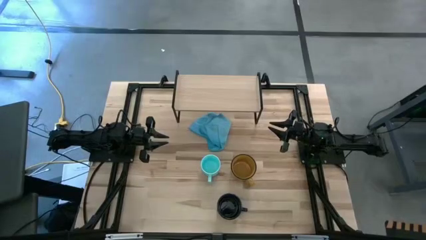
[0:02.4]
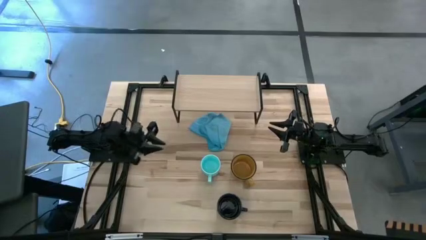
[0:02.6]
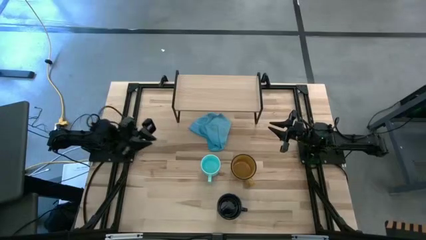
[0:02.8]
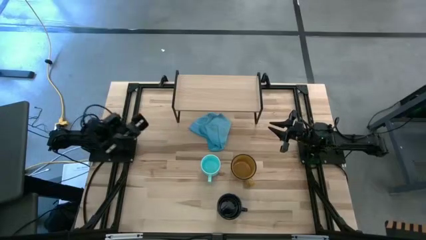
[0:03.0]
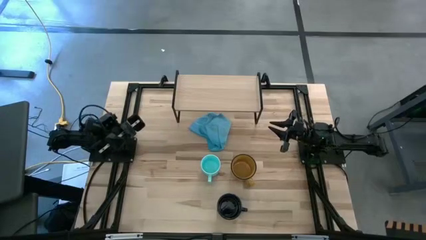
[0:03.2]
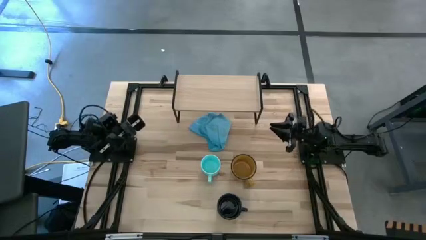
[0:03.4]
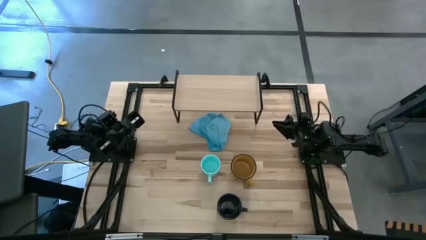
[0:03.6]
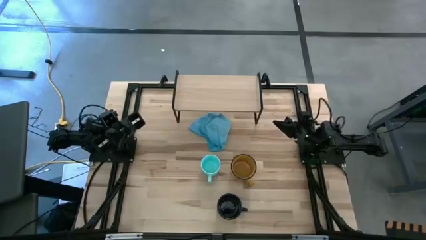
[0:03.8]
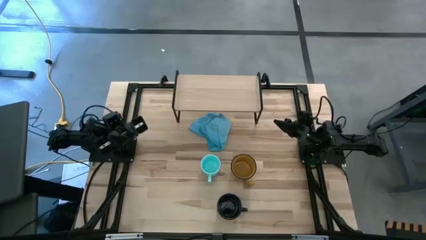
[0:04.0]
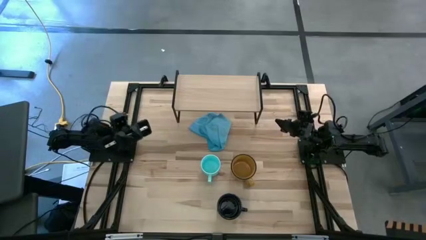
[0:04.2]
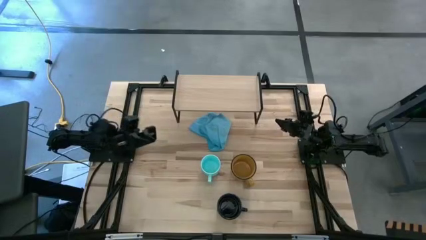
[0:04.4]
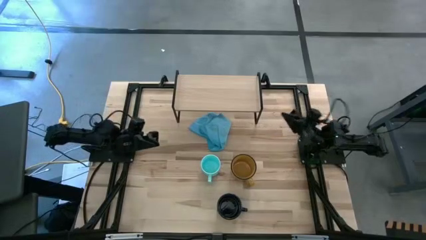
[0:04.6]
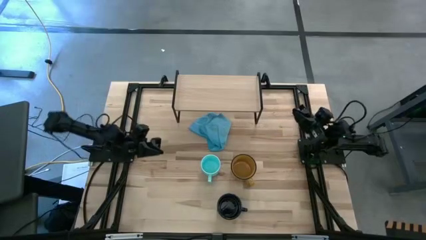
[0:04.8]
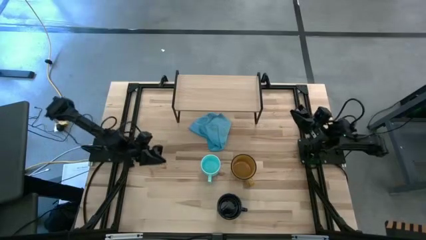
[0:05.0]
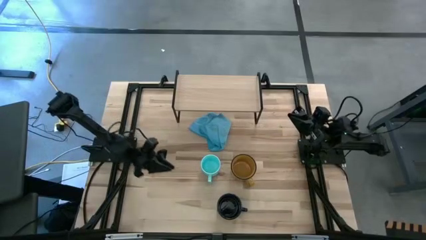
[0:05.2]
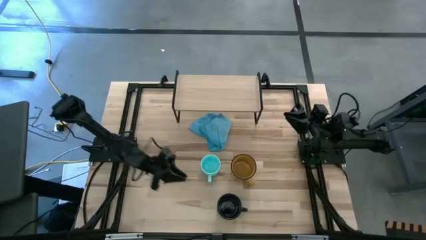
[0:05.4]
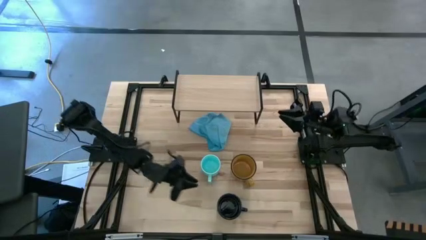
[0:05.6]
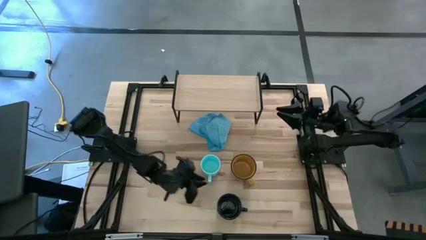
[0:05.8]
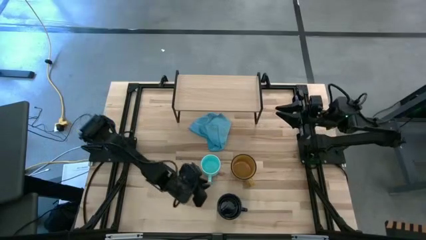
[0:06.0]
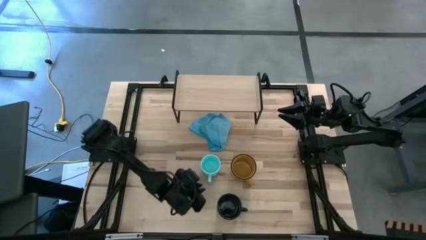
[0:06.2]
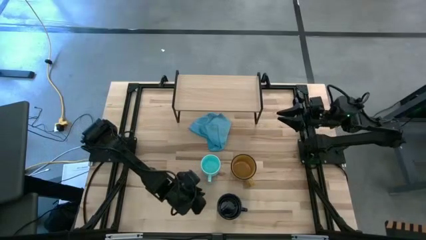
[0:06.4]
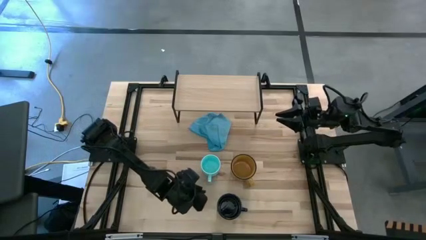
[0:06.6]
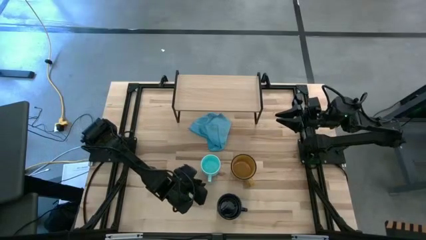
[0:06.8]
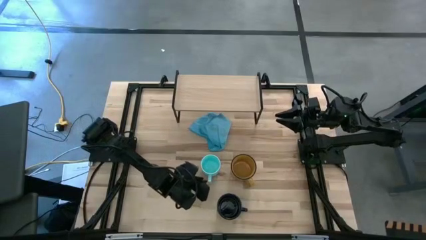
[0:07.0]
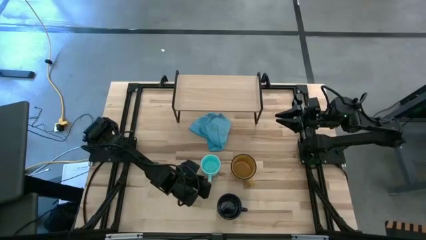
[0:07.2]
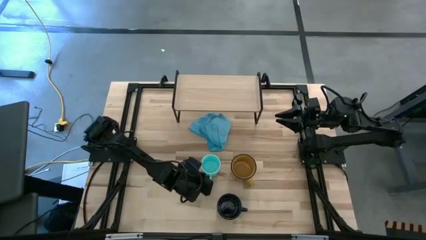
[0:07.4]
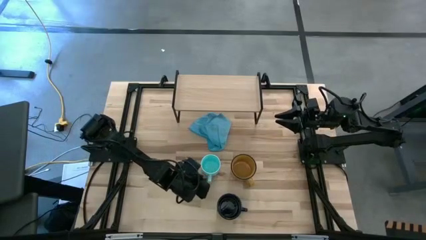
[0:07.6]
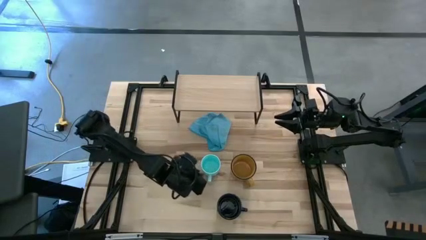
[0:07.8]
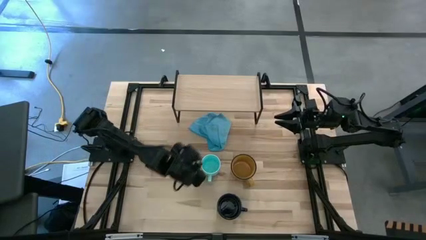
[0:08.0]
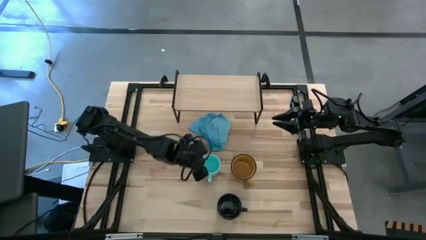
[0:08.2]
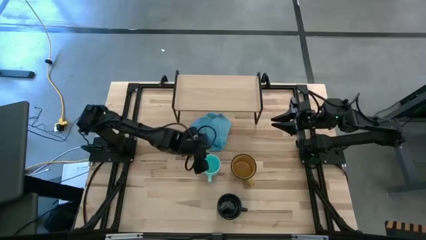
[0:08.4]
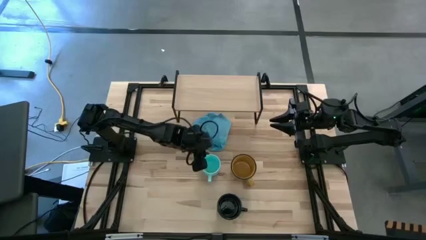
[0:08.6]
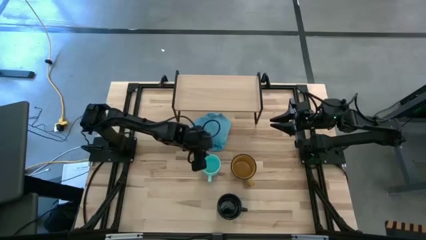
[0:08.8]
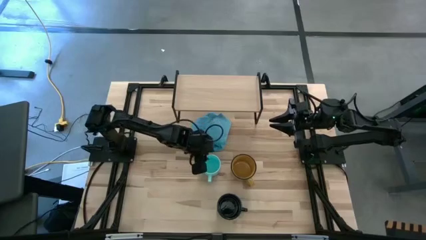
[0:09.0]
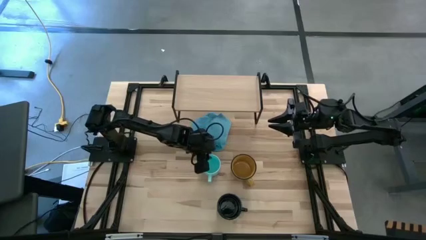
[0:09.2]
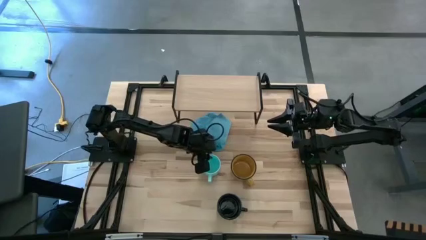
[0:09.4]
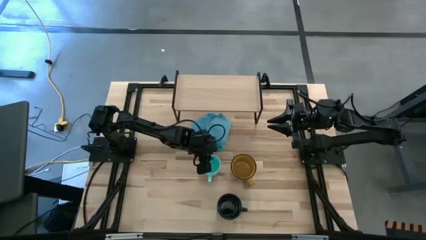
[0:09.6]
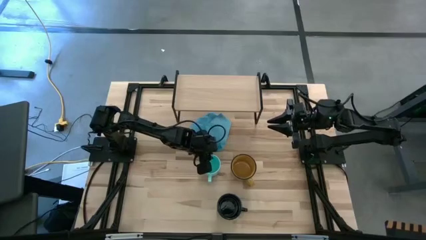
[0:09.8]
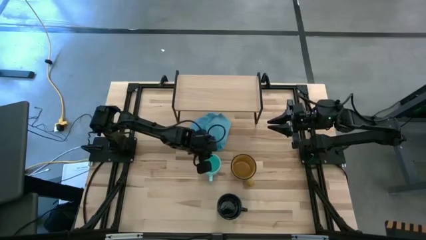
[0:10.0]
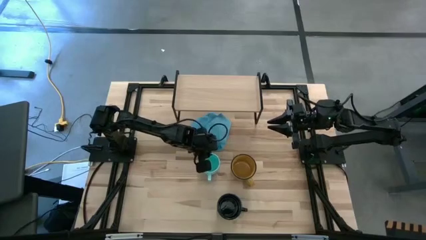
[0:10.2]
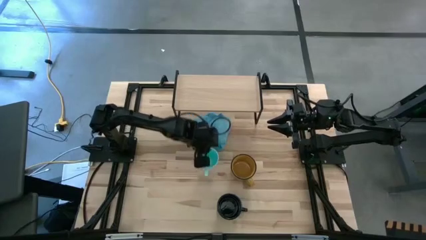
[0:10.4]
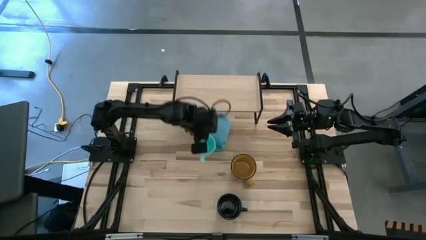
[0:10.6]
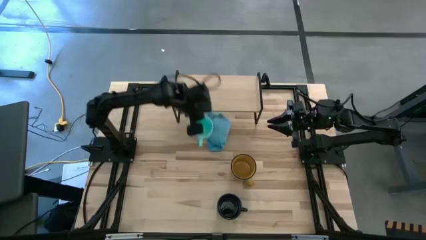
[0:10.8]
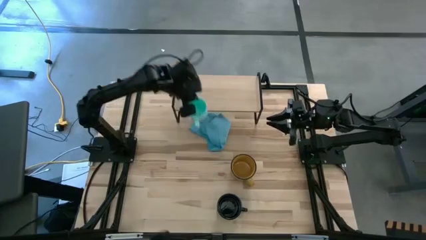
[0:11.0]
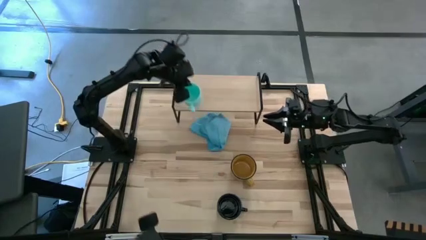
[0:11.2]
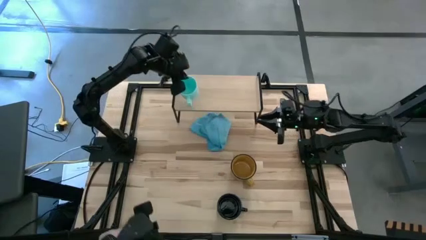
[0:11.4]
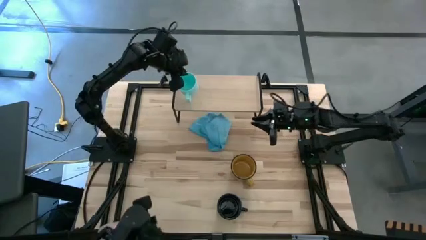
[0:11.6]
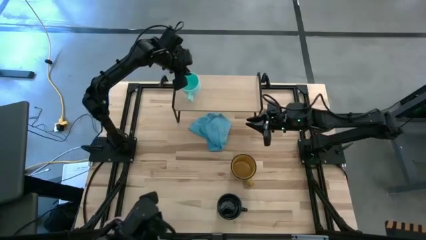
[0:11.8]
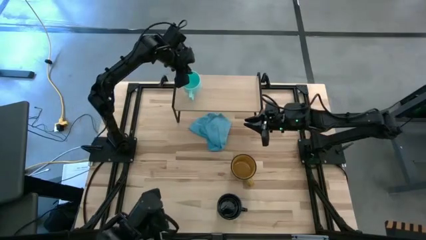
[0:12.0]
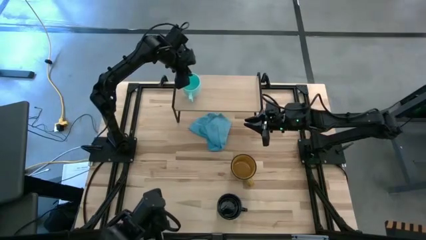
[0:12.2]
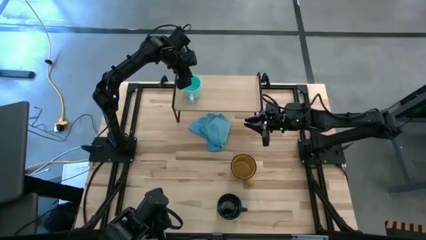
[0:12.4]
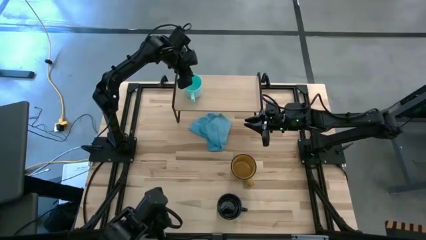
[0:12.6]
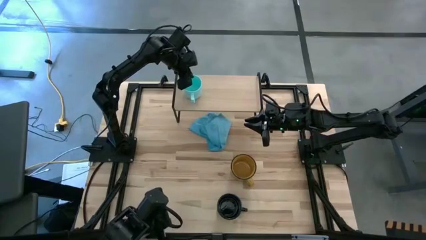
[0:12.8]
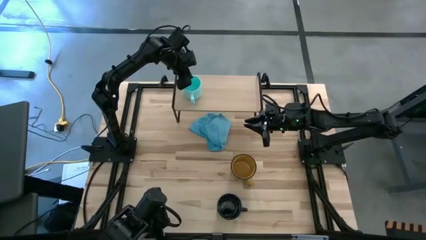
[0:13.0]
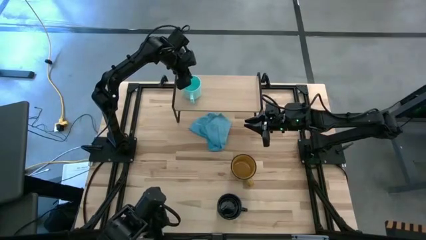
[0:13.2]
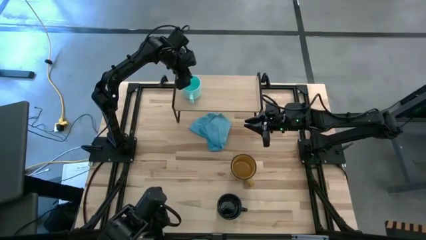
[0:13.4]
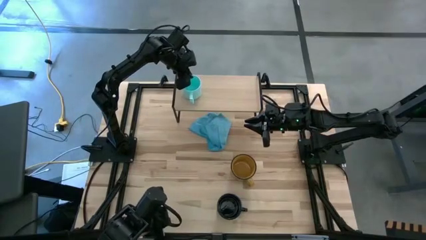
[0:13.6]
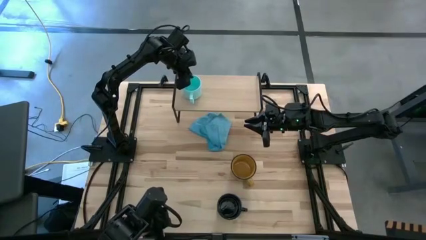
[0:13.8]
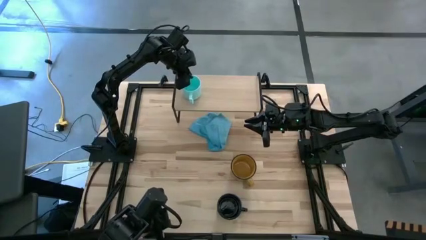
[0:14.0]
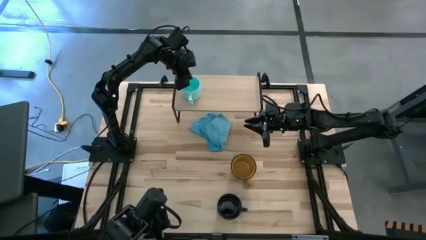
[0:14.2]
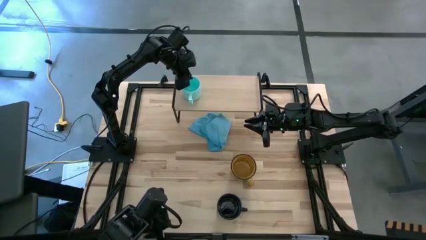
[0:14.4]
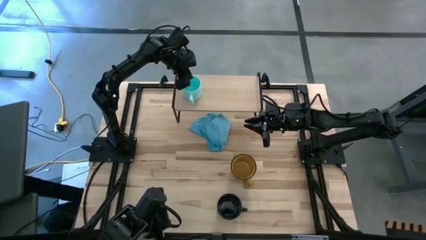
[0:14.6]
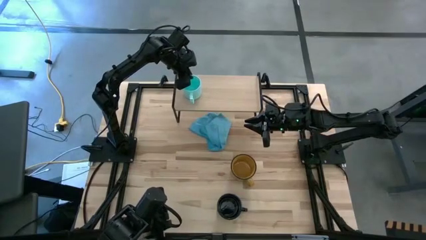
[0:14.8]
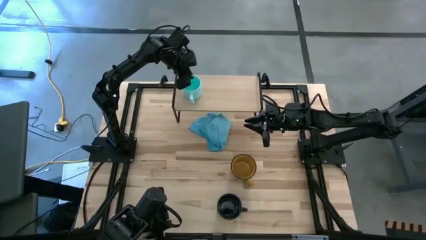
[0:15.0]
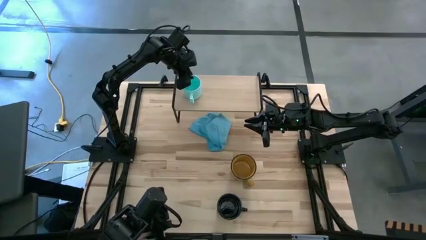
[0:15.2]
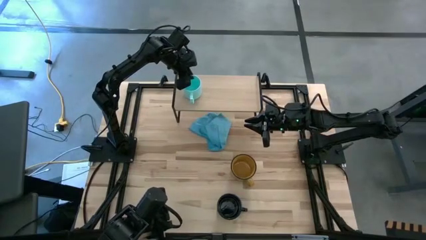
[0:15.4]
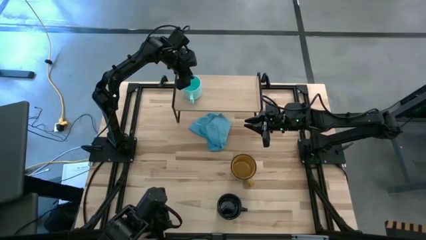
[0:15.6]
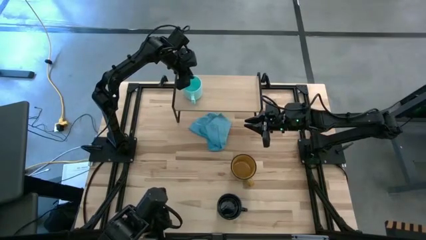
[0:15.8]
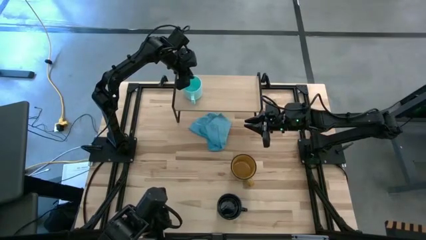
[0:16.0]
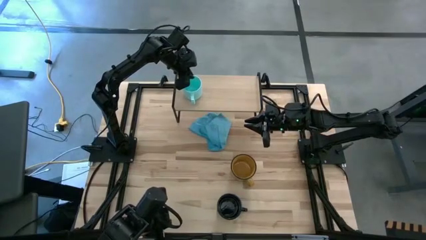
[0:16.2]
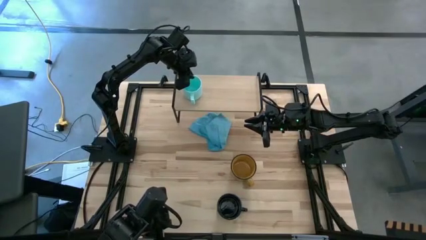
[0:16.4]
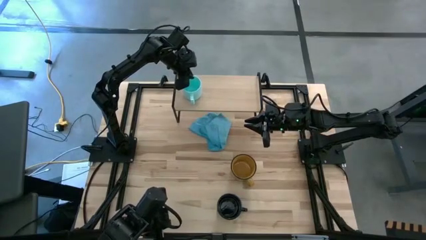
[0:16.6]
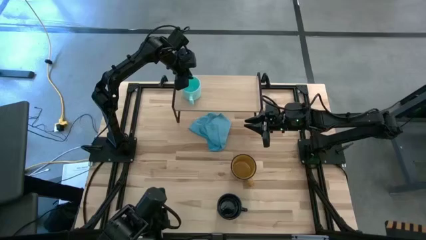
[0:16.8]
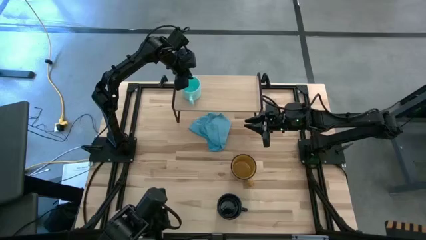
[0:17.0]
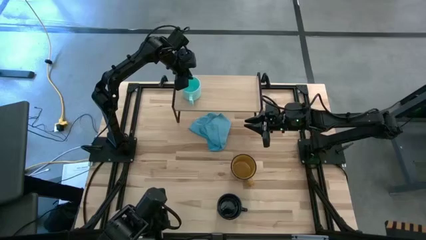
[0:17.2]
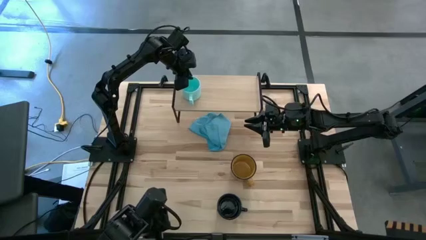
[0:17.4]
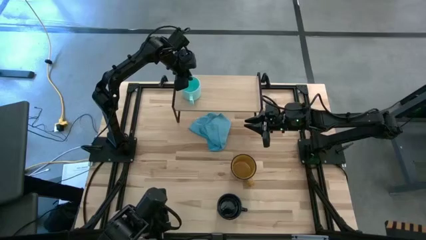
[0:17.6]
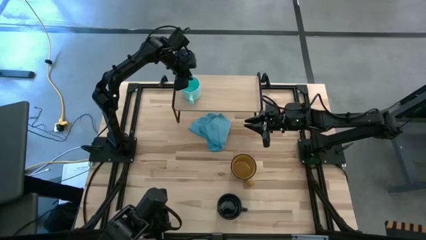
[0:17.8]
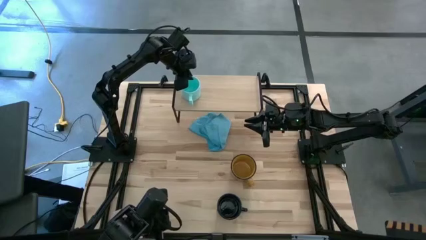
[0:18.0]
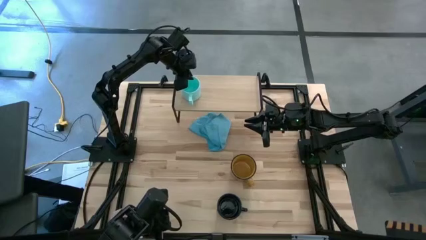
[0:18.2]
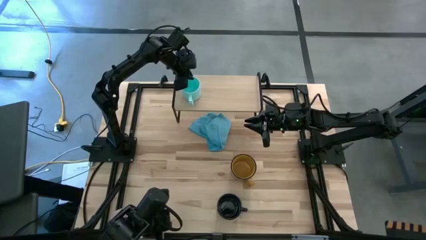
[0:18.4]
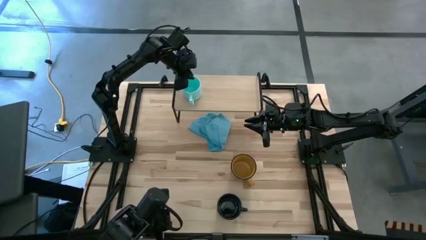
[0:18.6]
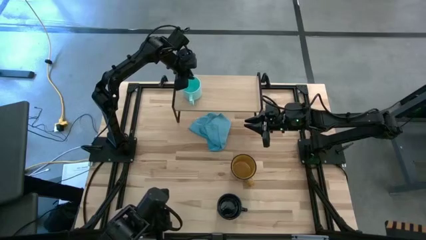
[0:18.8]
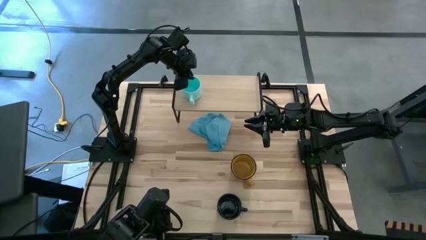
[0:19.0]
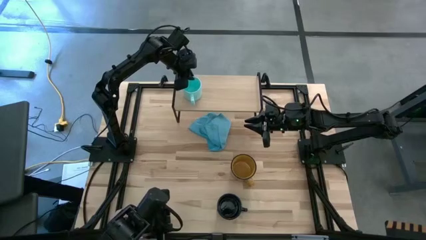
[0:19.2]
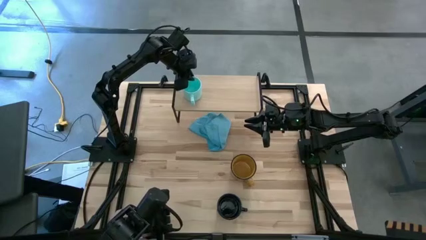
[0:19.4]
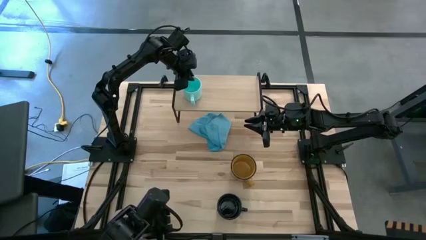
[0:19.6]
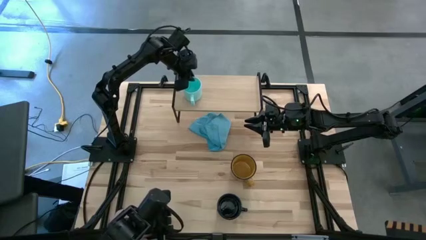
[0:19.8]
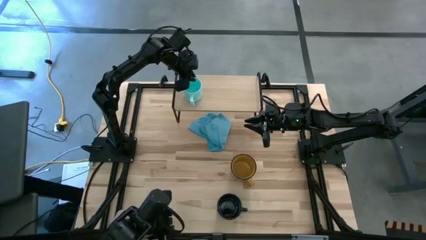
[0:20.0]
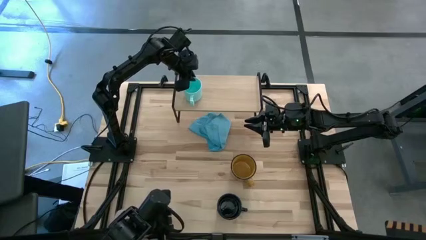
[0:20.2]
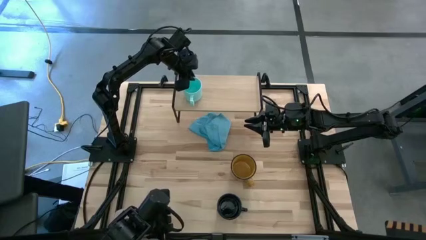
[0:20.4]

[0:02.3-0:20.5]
Task: Stack small to large cups/mugs on shelf
Put the light blue cup on the shelf
